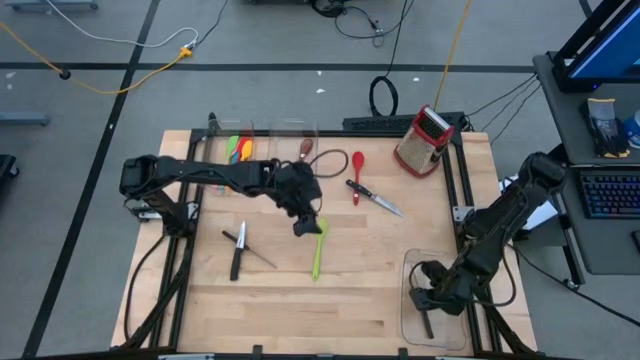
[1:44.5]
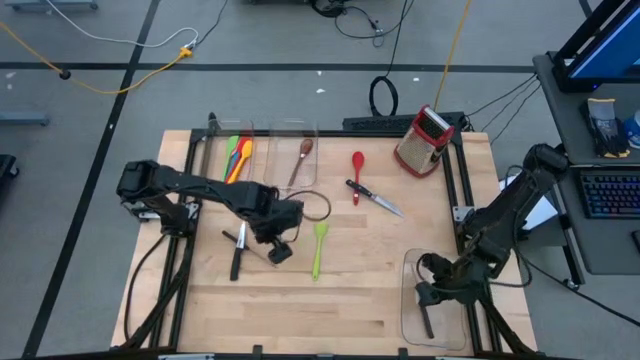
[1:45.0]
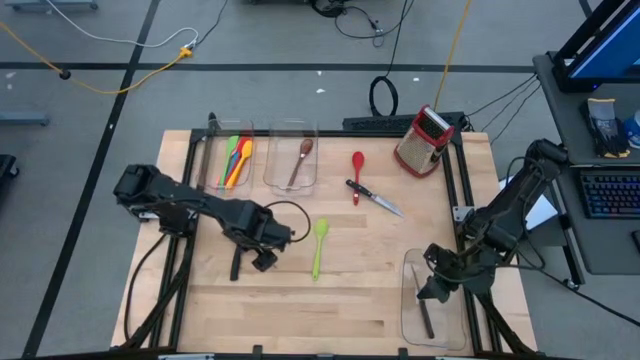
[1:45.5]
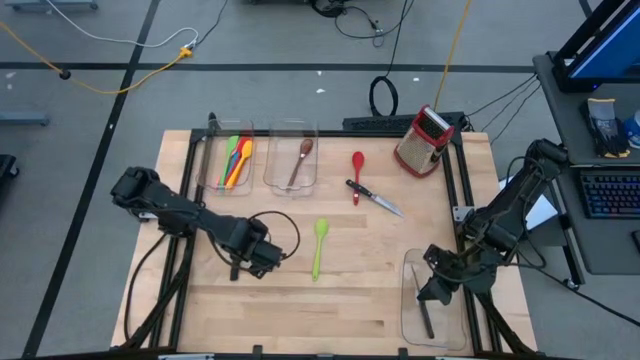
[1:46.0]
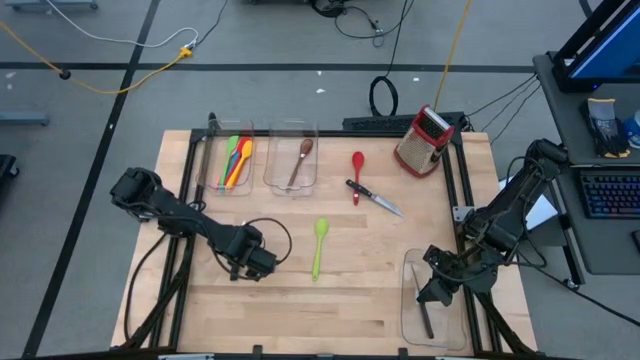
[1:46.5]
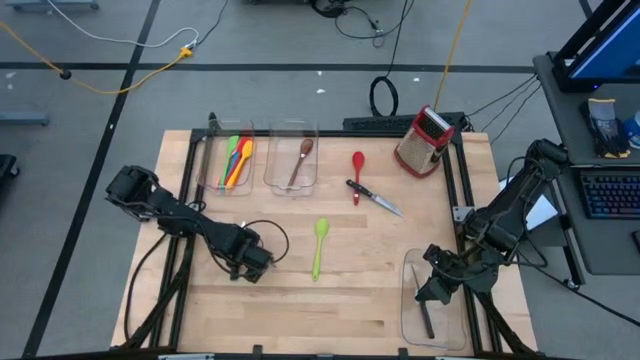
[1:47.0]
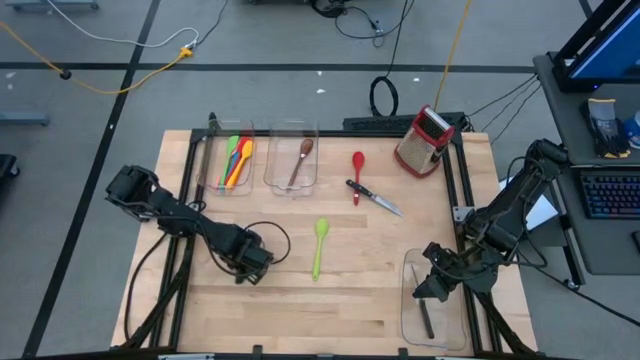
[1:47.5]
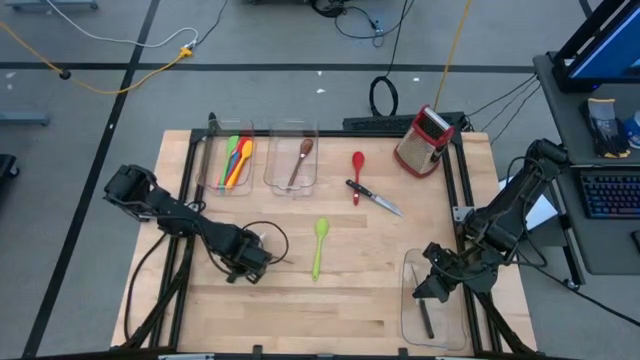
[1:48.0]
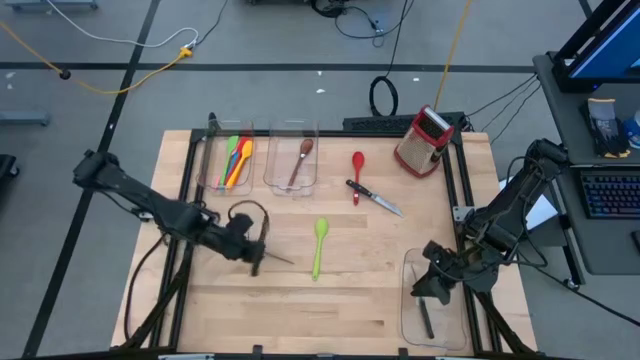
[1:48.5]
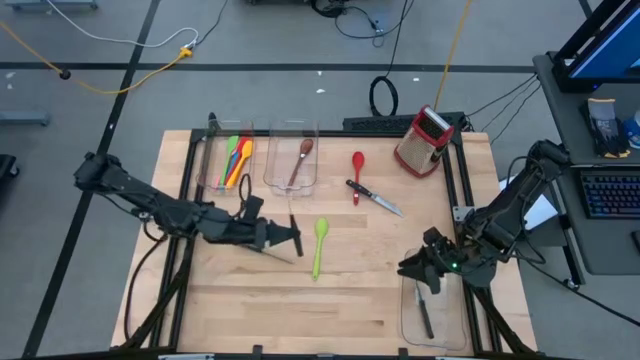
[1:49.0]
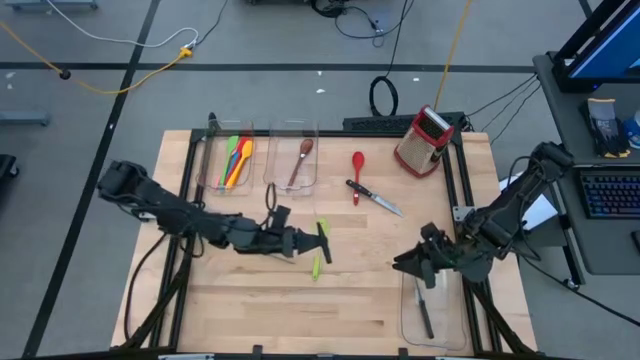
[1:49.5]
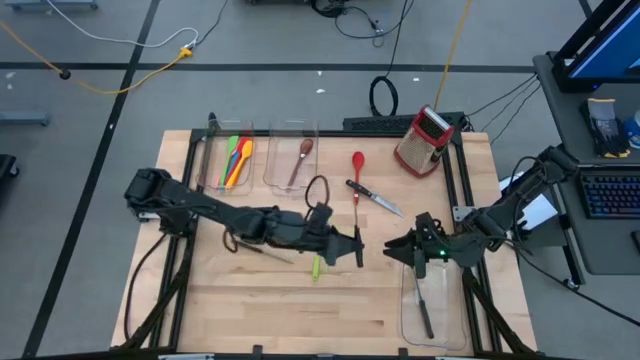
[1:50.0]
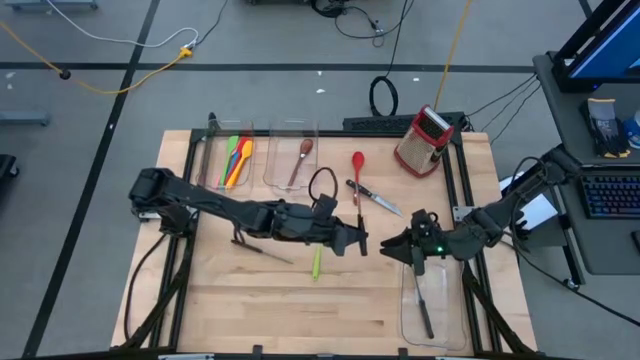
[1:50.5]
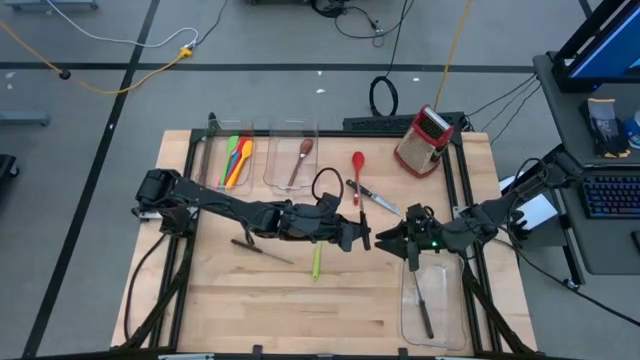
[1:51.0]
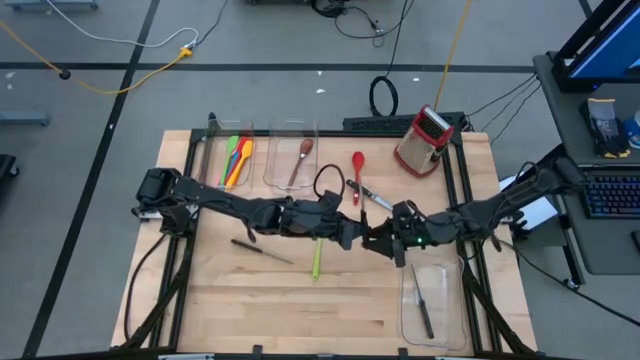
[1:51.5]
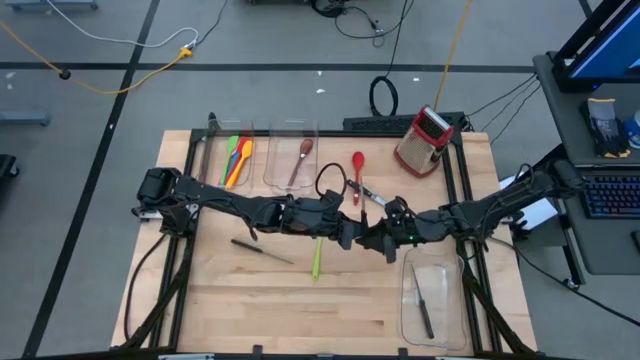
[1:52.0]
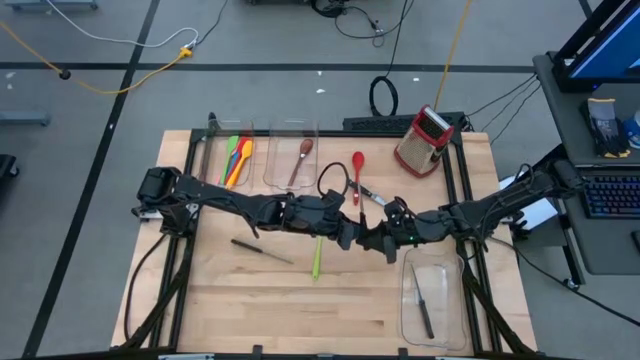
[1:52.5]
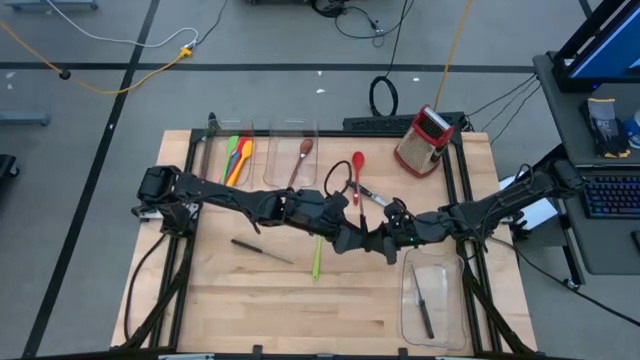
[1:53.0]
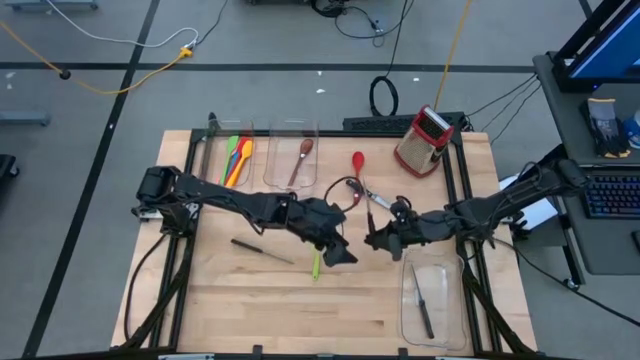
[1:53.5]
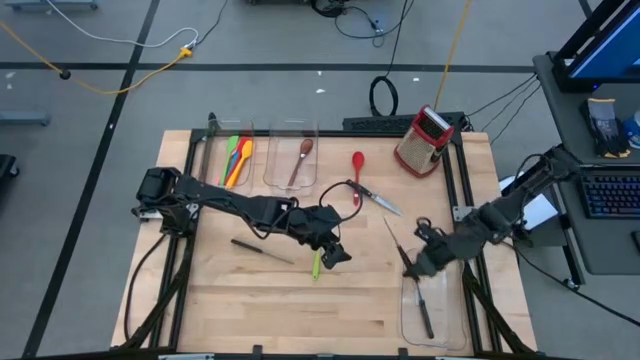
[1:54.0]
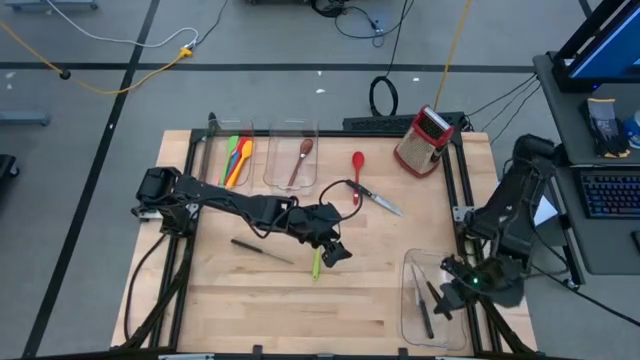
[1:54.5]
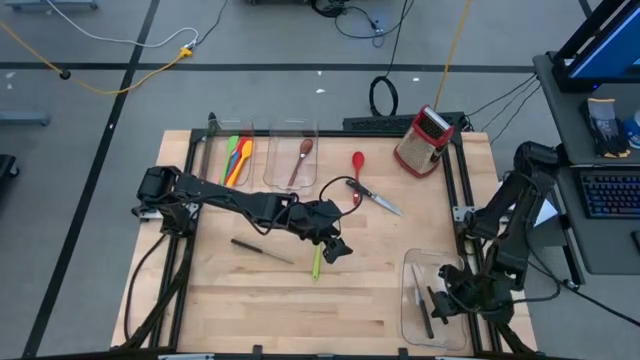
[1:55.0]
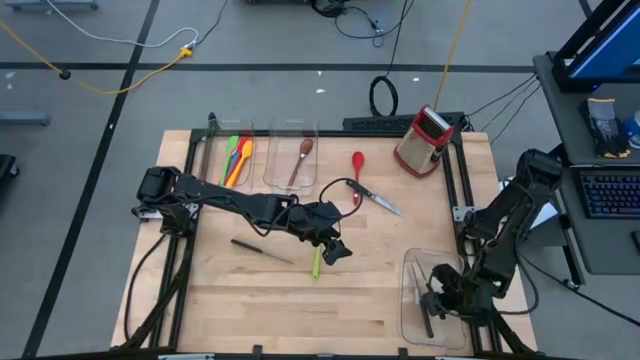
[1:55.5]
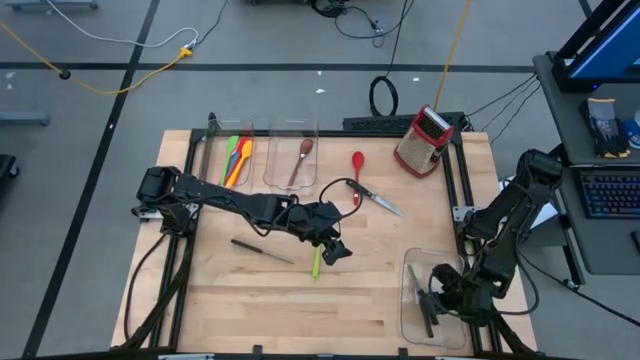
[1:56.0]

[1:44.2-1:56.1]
Task: Pick & Place Kitchen Items
Put the knife into the bottom transparent bin

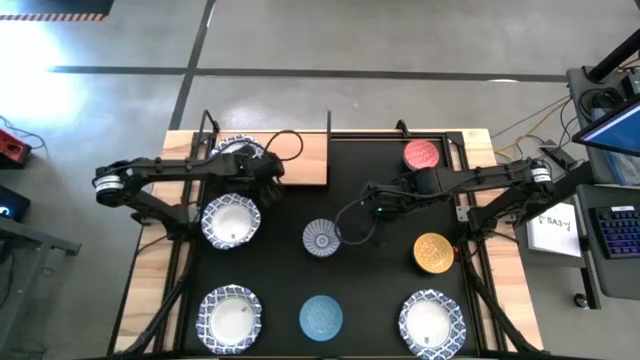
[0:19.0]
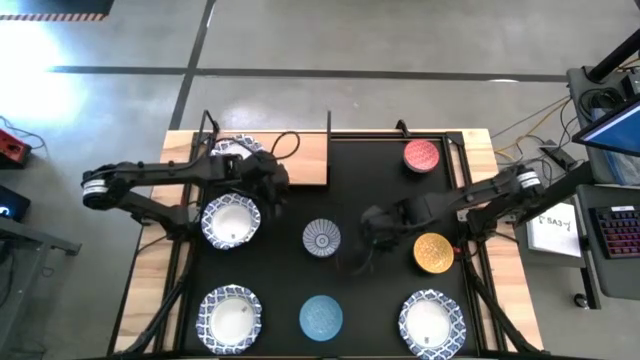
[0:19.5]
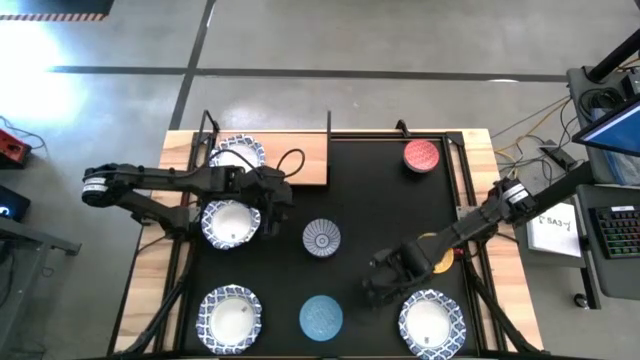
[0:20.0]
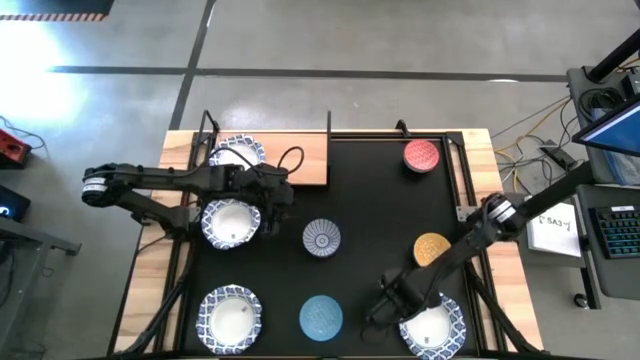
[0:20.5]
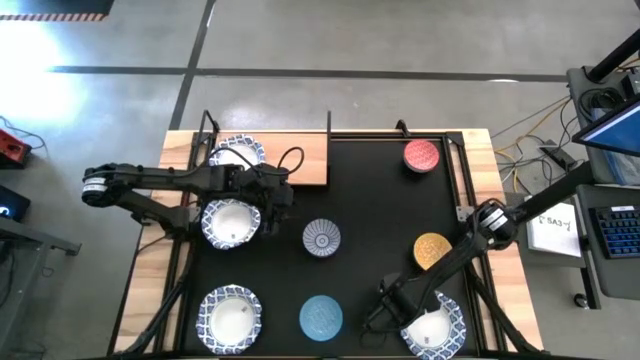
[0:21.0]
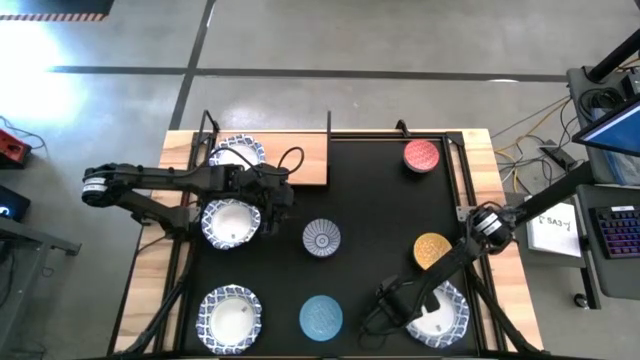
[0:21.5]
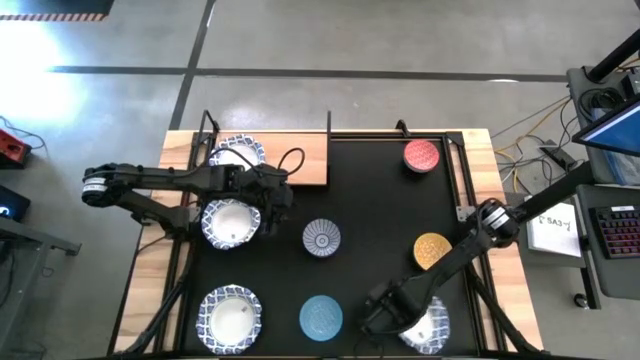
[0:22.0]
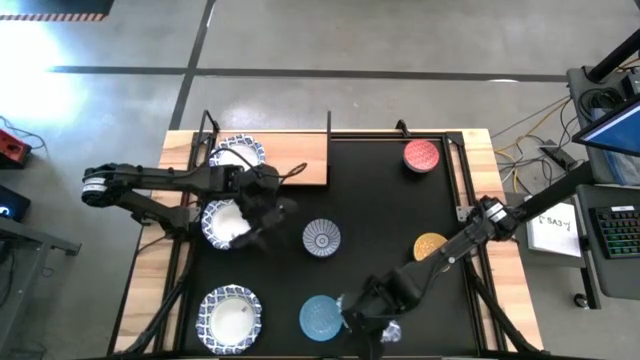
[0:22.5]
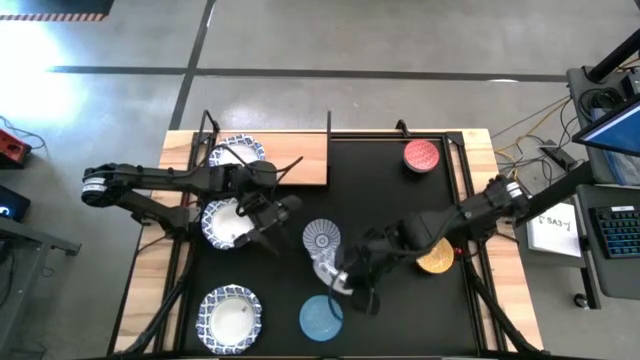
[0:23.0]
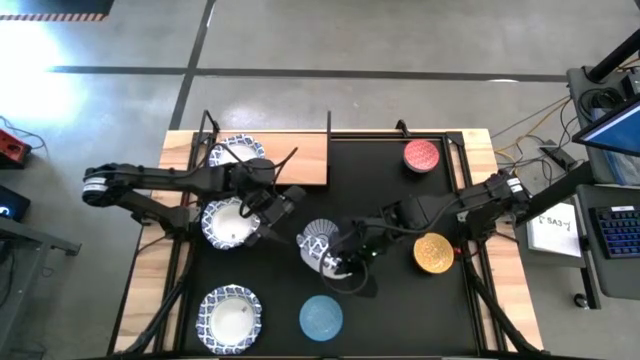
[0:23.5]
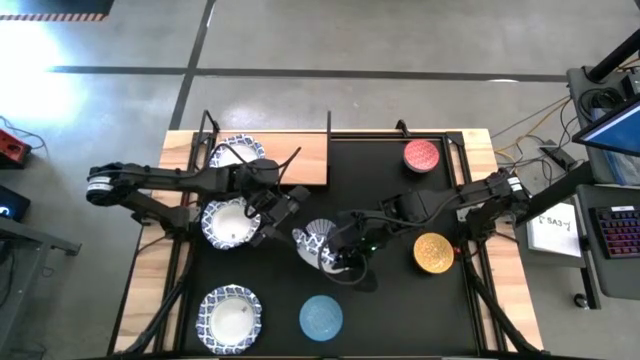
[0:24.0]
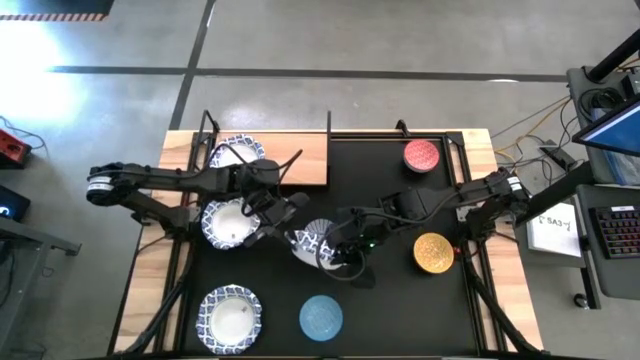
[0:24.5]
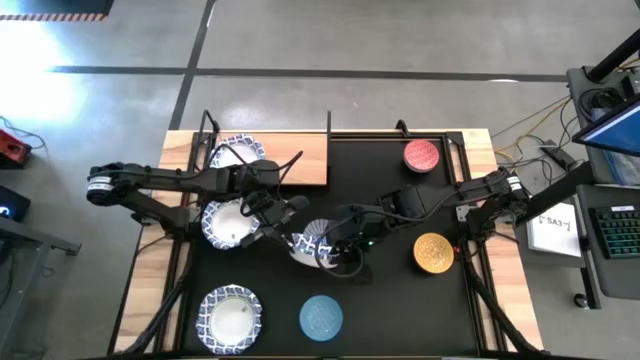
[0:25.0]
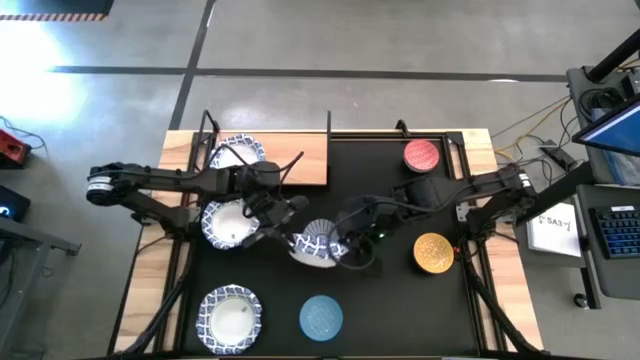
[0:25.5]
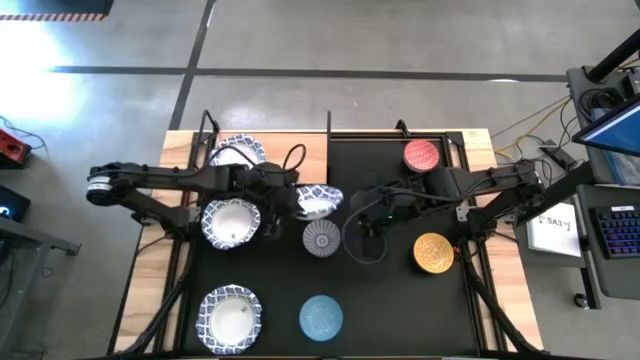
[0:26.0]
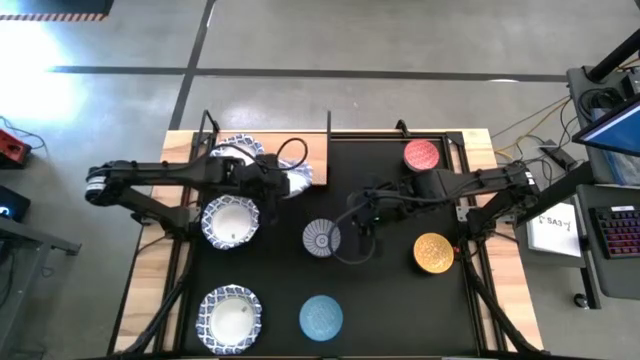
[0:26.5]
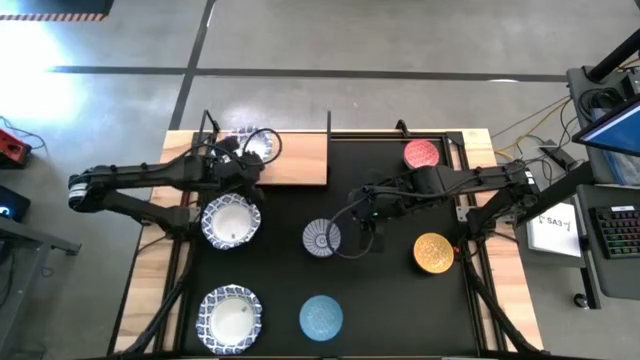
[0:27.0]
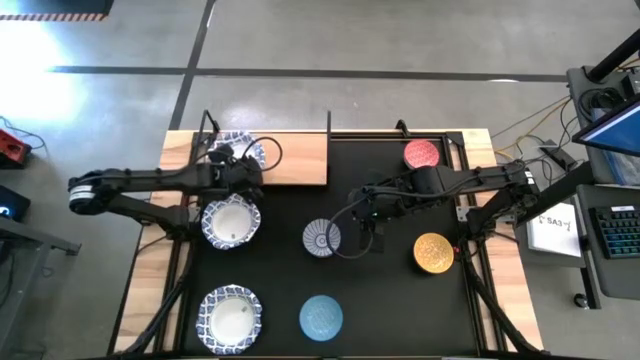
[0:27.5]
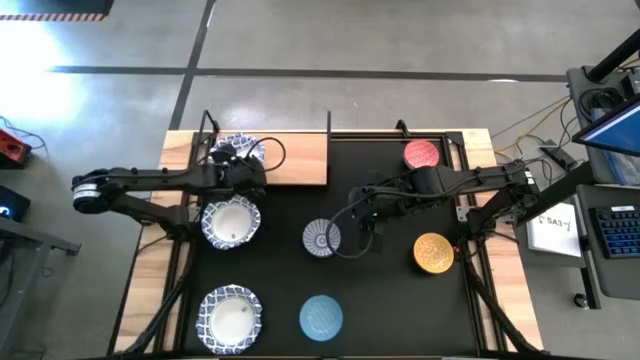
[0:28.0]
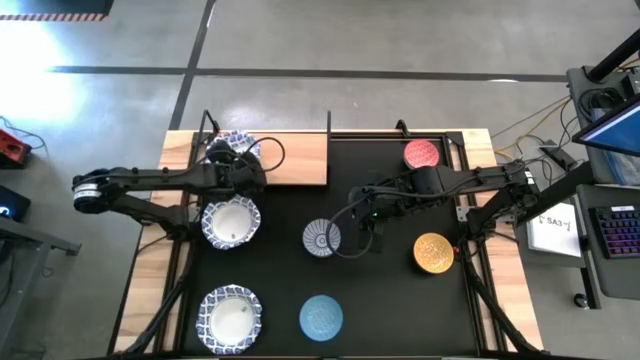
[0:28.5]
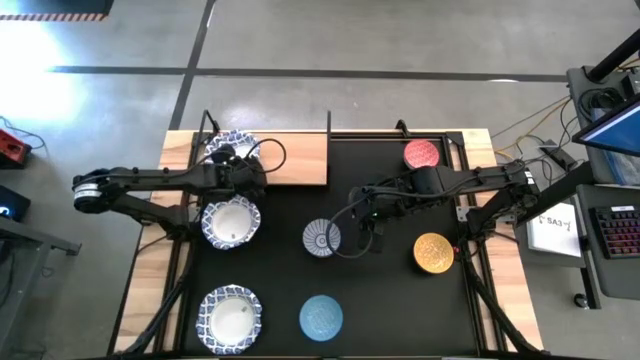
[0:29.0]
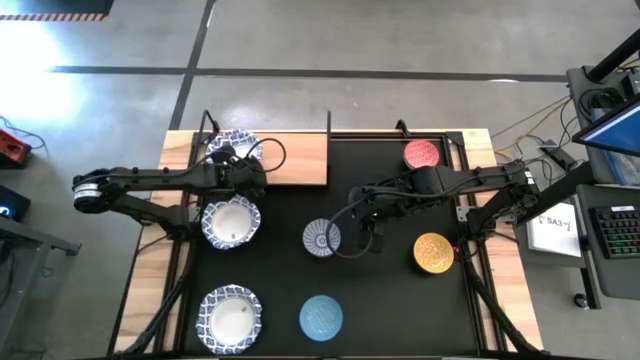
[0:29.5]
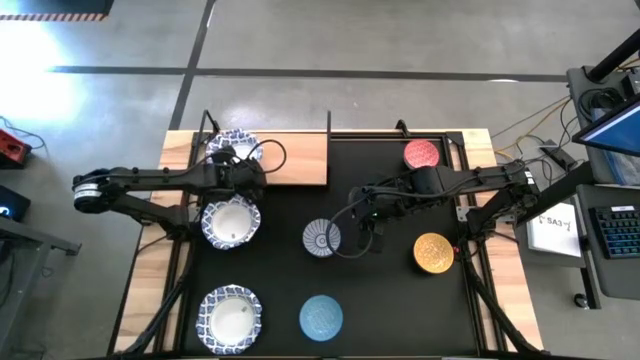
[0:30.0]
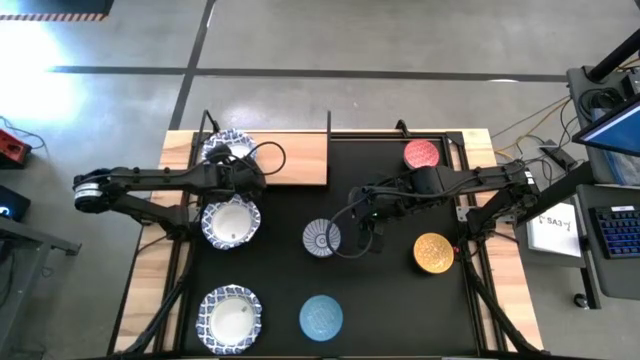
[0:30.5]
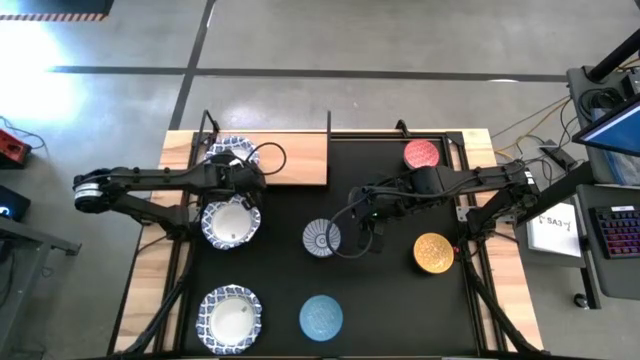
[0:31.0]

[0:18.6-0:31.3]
Task: Place and stack bowls onto a shelf
Stack the bottom right white patterned bowl on top of the white patterned bowl on the shelf
